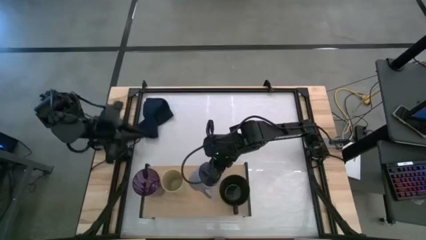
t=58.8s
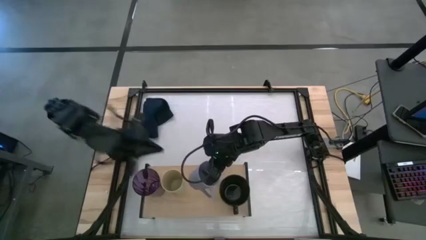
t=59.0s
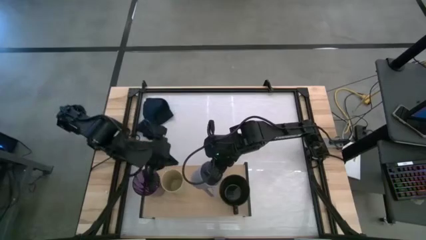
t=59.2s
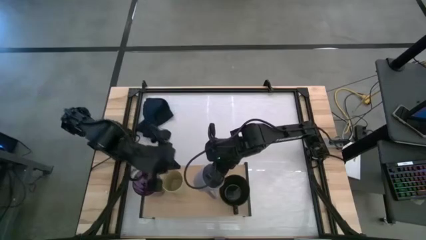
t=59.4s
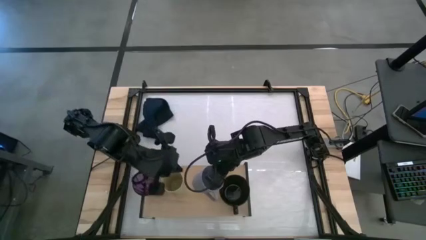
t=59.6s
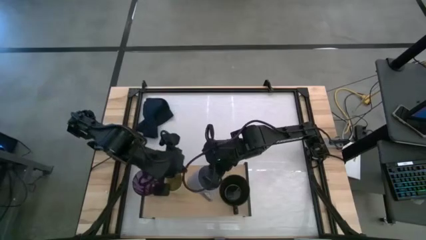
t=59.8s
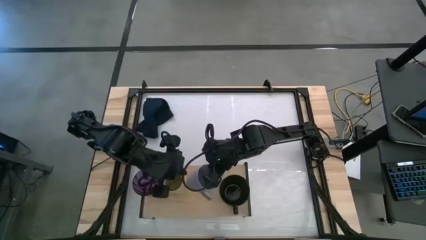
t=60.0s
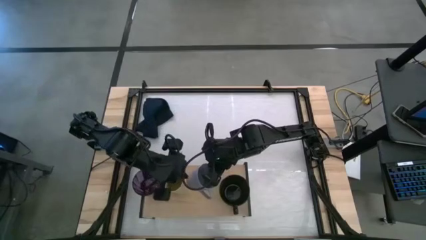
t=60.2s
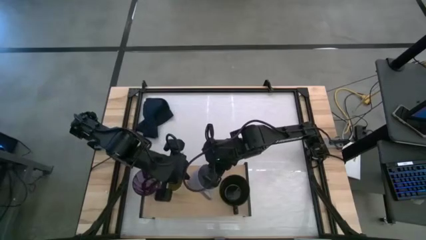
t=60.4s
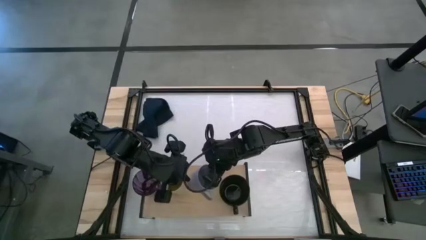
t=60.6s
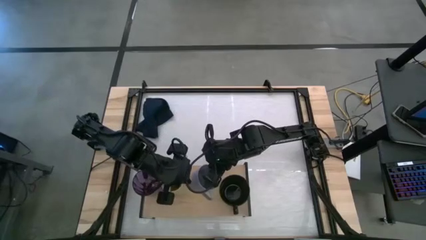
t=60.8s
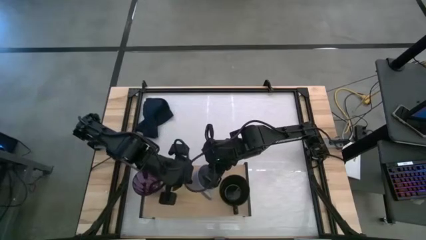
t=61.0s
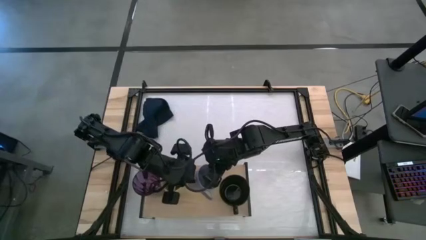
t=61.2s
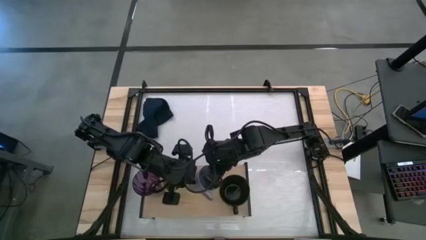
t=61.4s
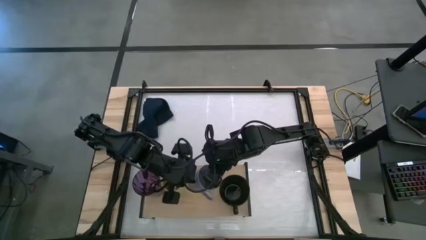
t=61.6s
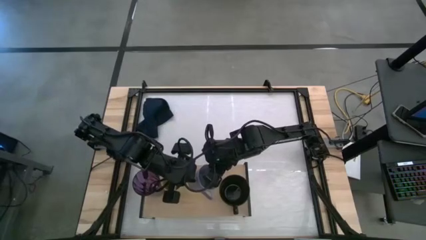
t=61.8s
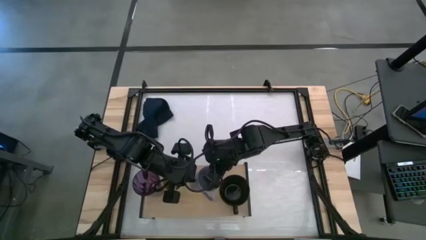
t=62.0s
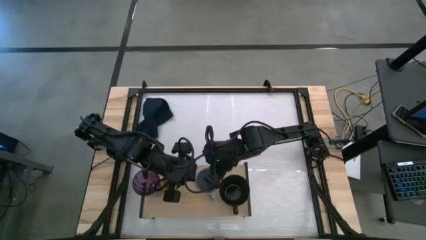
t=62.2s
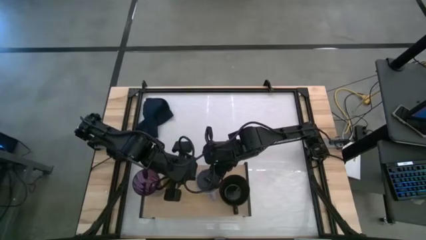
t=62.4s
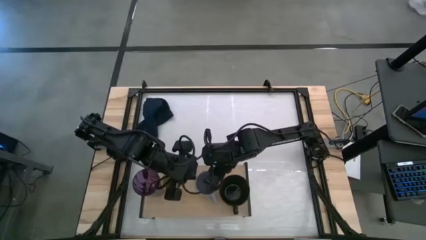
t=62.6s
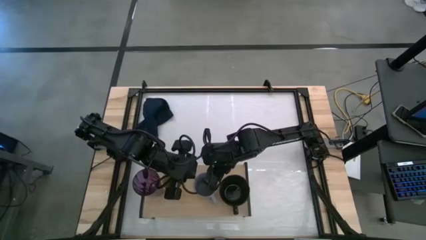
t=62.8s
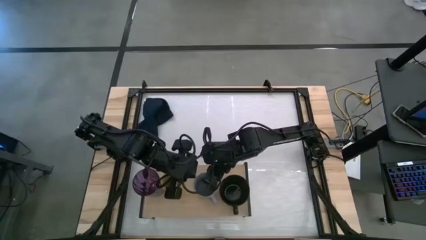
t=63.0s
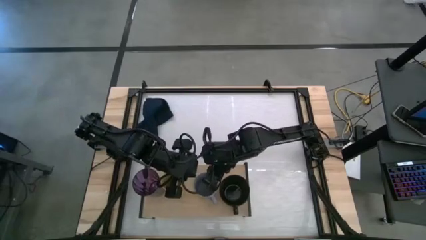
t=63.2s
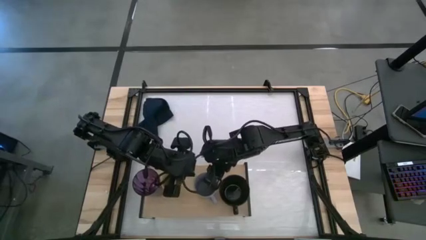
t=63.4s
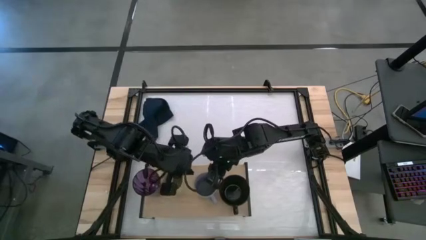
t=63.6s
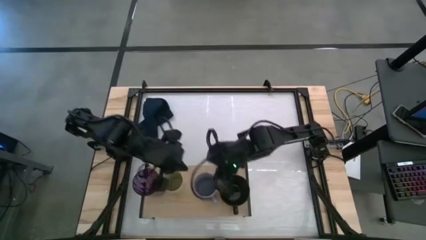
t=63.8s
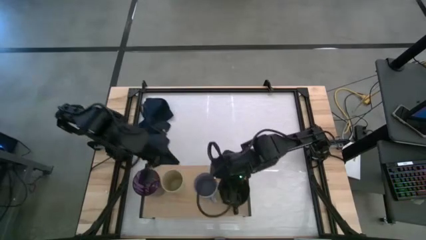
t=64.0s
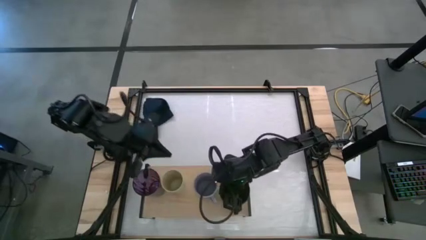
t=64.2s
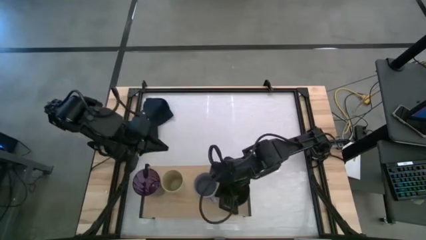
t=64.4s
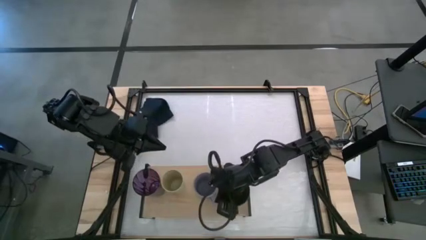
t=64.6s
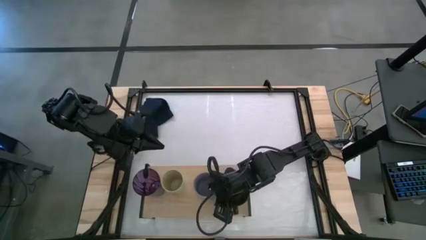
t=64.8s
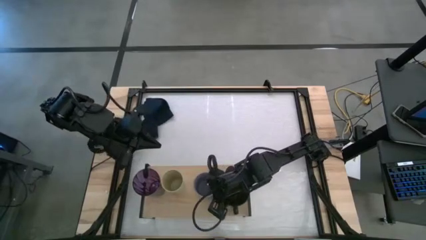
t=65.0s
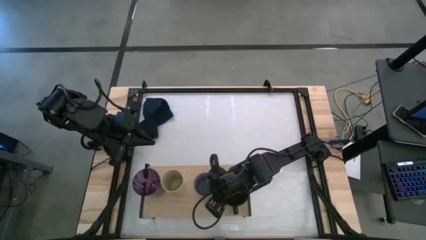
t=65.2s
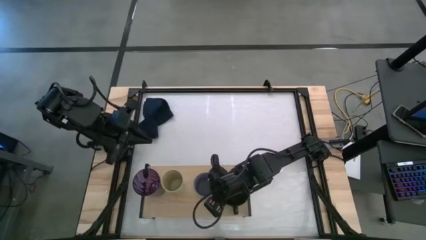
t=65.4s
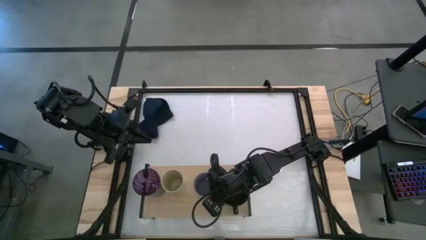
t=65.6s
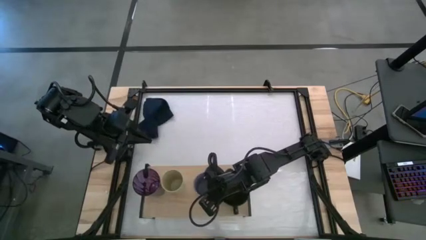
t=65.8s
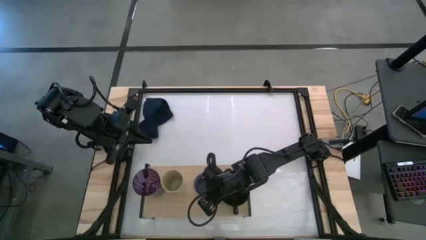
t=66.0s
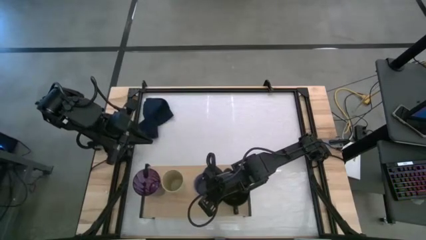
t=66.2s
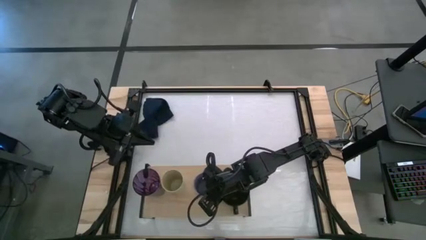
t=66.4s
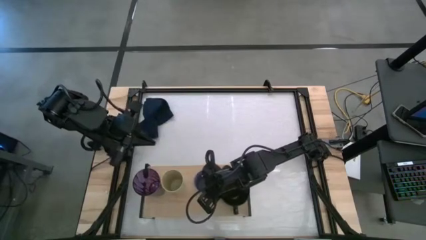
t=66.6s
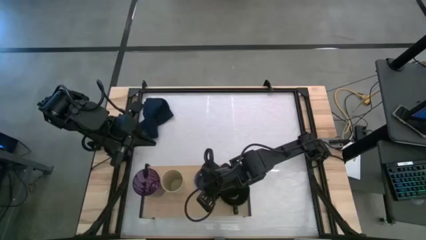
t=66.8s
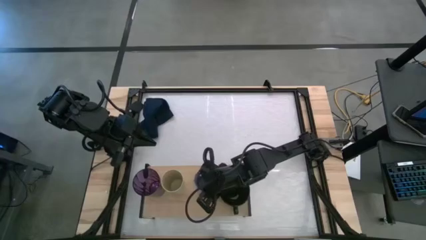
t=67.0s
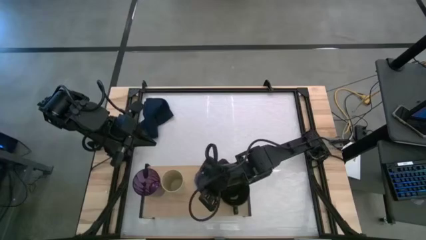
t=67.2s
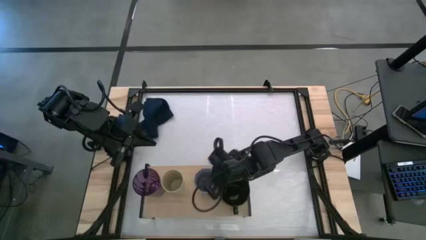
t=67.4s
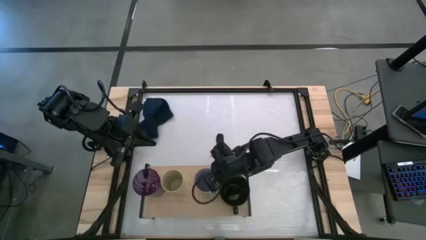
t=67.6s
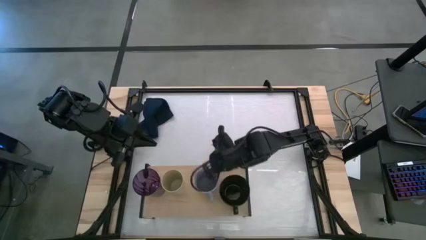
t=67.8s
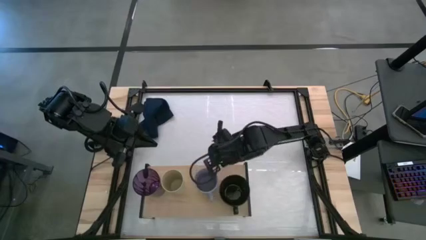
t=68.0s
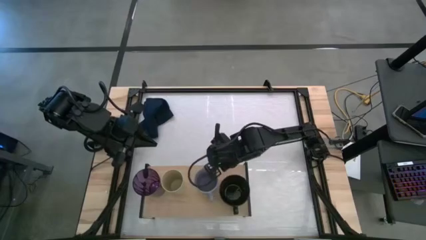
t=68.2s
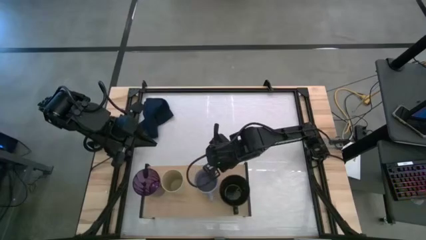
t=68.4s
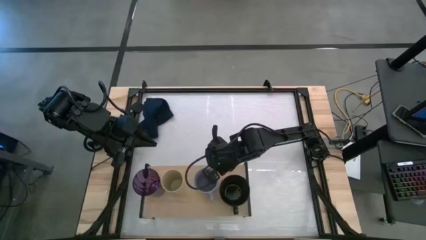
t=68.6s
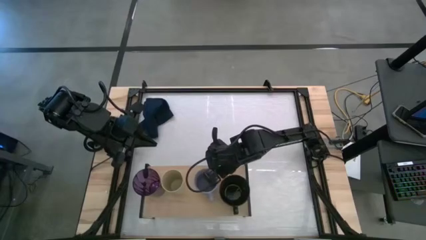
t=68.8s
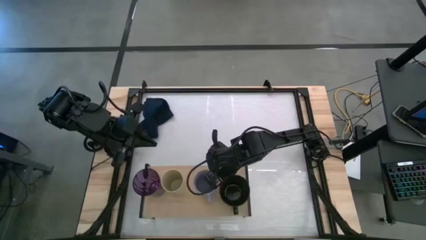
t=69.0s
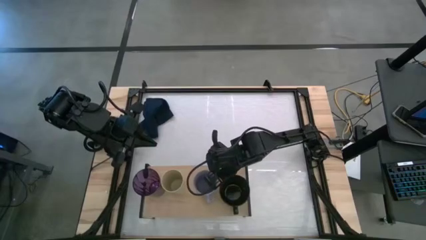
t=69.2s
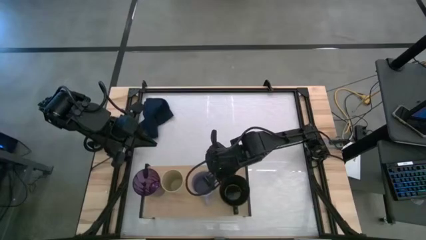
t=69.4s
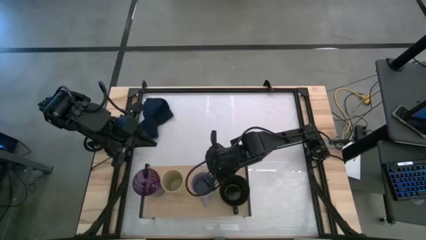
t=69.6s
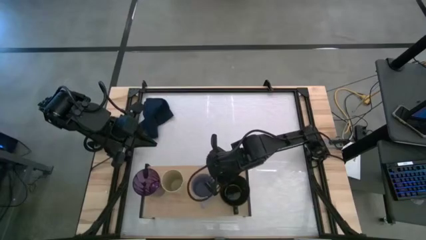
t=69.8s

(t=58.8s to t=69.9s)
Task: Stack small to large cups/mugs on shelf
Put the gray mug on the shelf

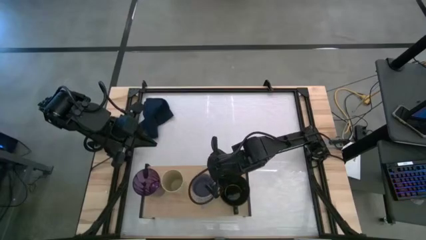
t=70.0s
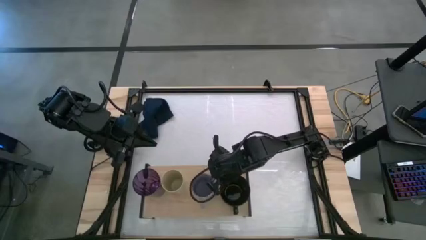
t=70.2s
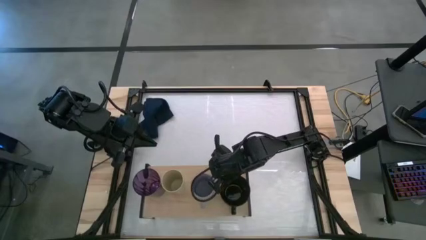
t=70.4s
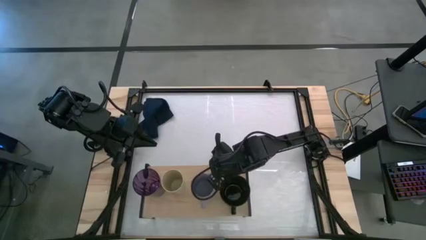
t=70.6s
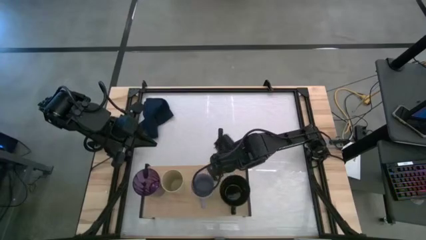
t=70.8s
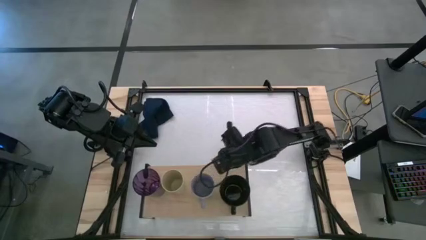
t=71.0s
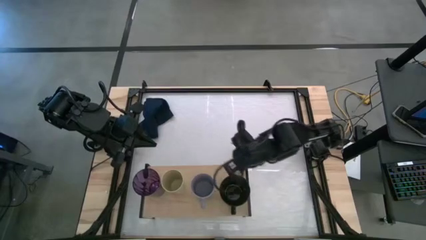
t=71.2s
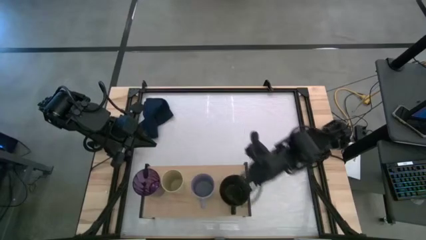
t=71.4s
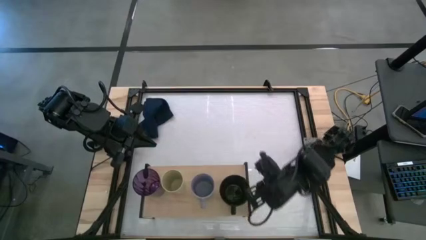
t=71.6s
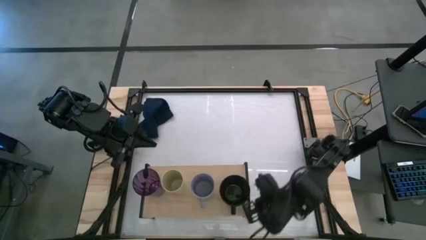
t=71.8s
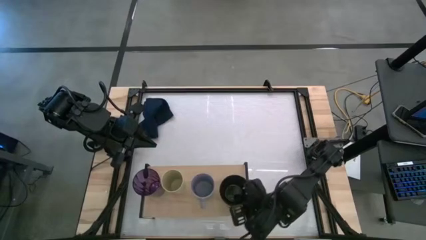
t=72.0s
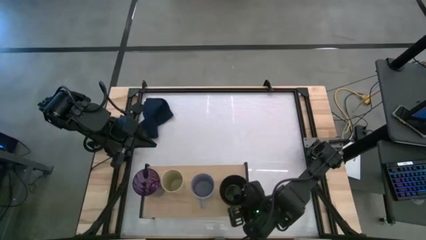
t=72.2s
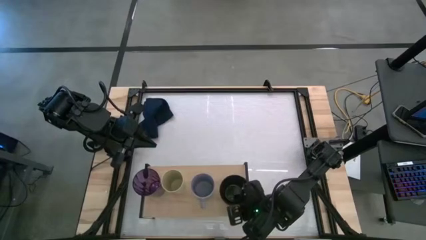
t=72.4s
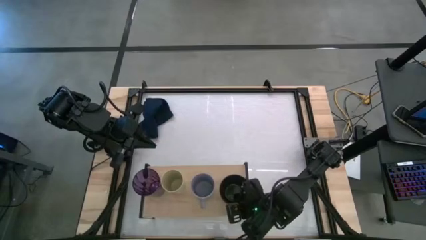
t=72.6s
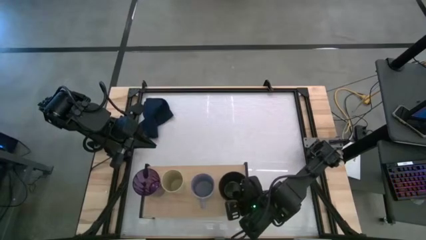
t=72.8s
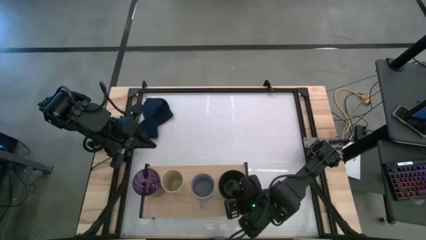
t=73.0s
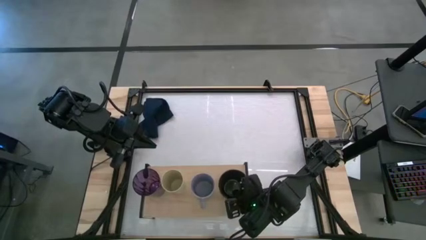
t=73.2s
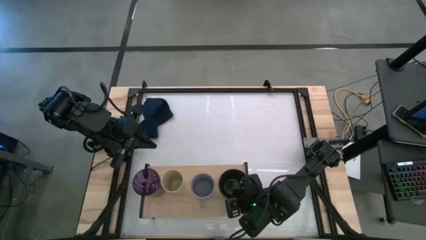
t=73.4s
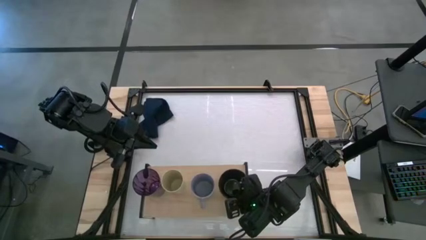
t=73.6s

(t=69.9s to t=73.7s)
Adjust the black mug on the shelf

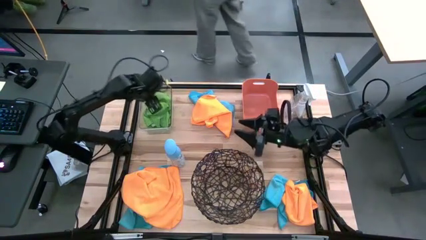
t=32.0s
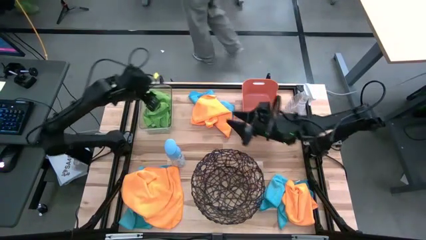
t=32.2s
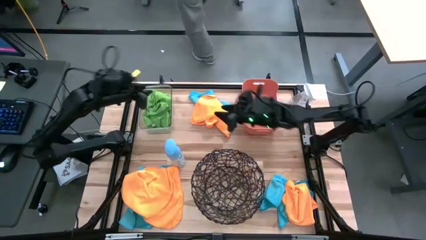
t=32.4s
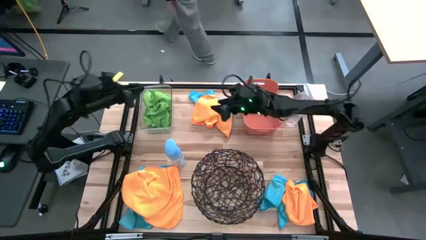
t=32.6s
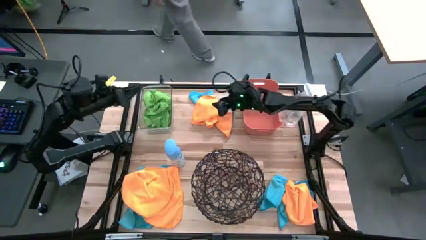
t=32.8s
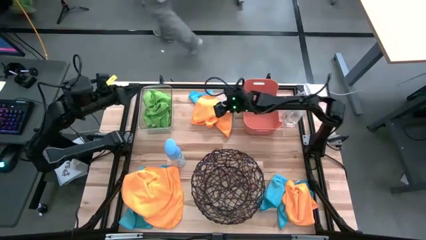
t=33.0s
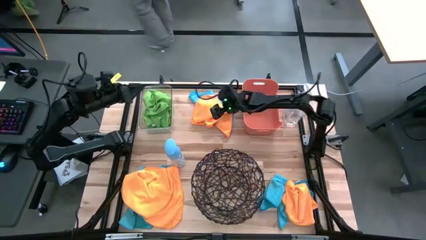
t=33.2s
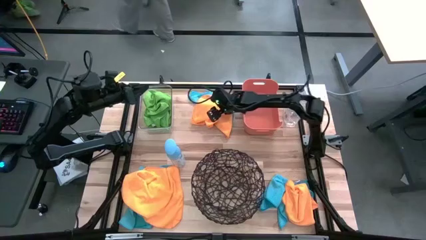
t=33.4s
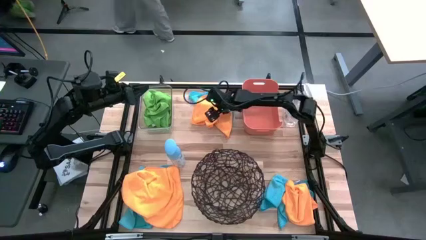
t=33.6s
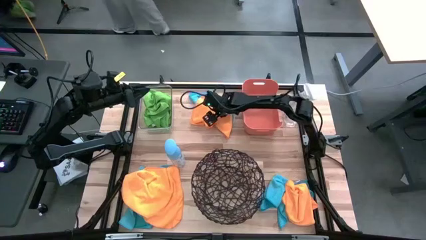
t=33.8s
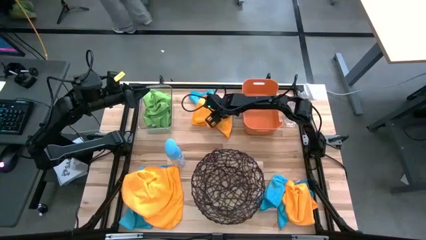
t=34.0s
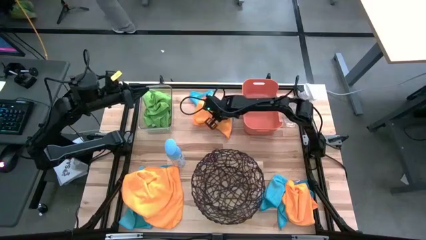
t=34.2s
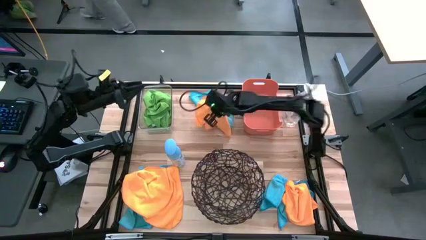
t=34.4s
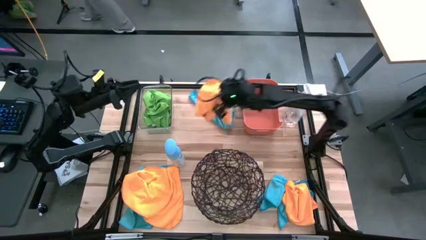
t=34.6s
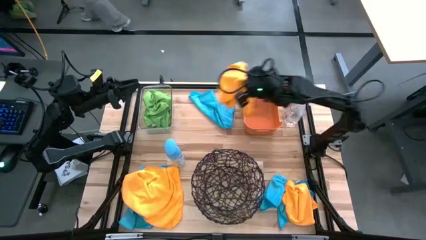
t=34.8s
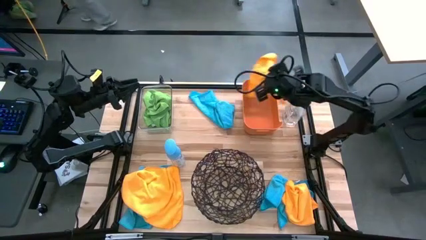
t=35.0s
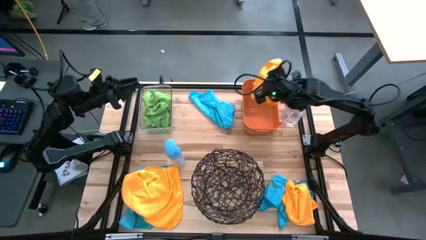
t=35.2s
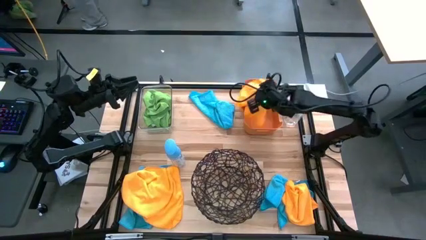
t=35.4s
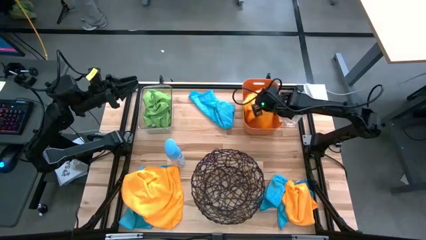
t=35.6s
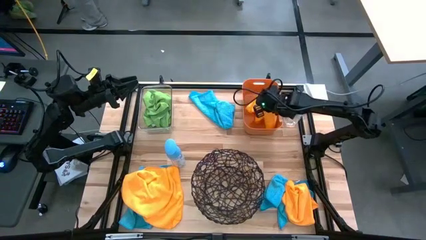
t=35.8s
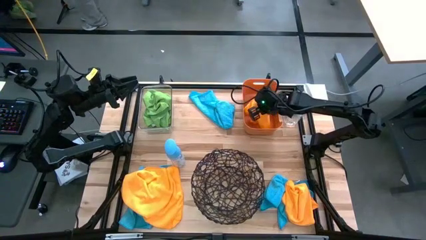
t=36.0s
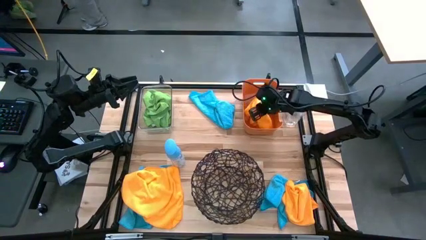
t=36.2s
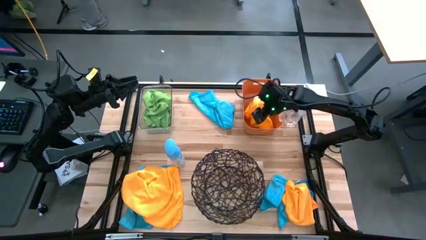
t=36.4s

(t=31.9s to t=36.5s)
Task: Sort microfiber towel by color & place in baskets
Put the top orange microfiber cloth into the orange bin
